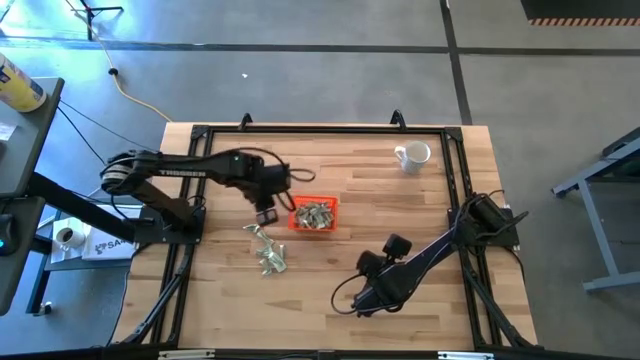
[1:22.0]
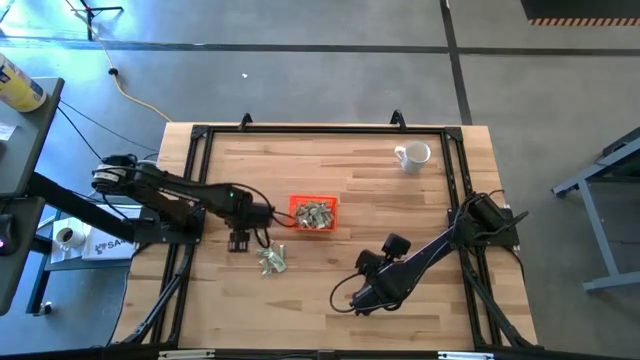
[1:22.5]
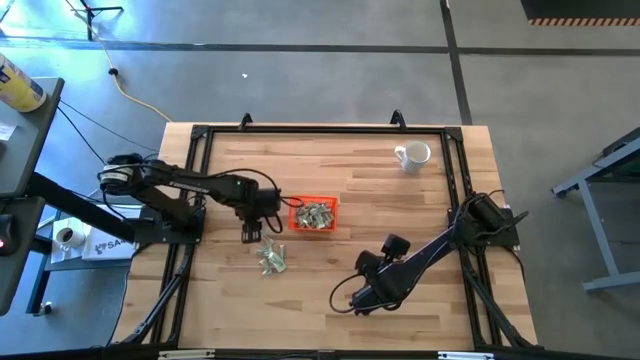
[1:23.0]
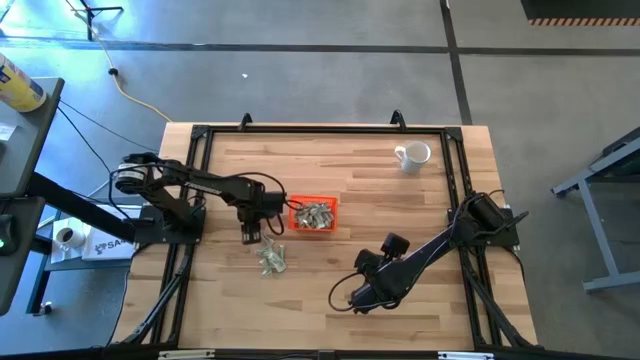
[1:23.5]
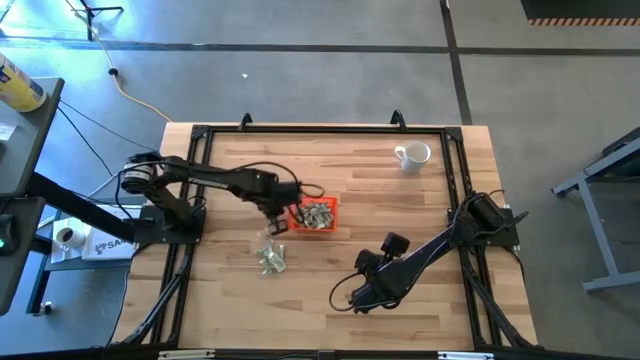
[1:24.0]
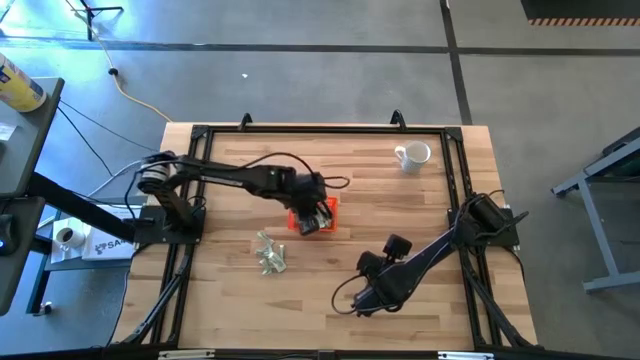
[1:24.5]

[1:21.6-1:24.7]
Task: Pick and place Stevia / Truvia into bins
Put the stevia packet into the orange bin

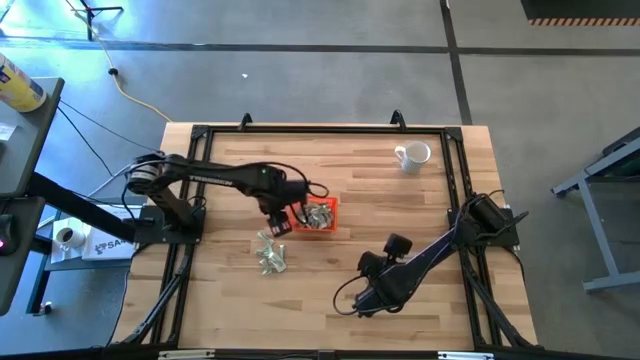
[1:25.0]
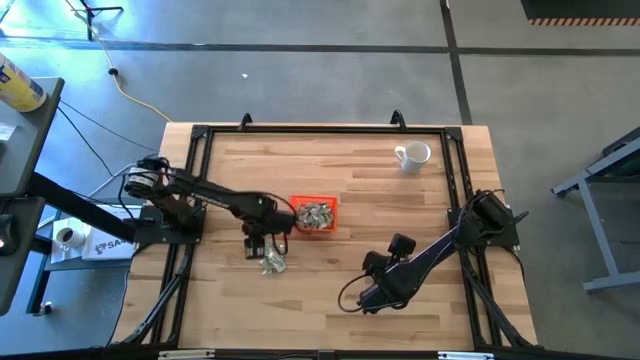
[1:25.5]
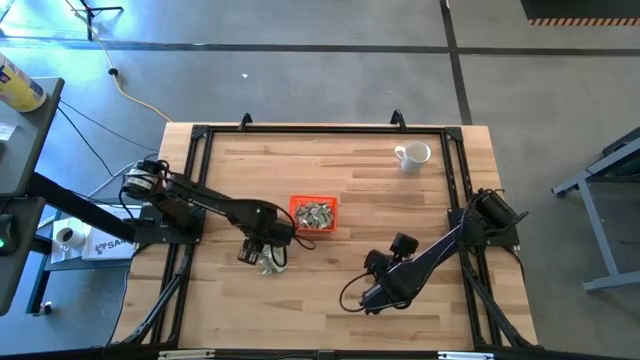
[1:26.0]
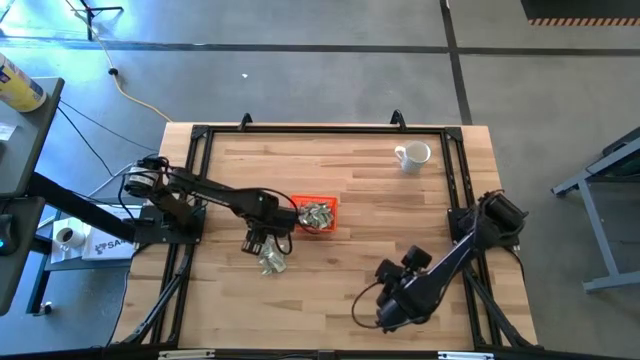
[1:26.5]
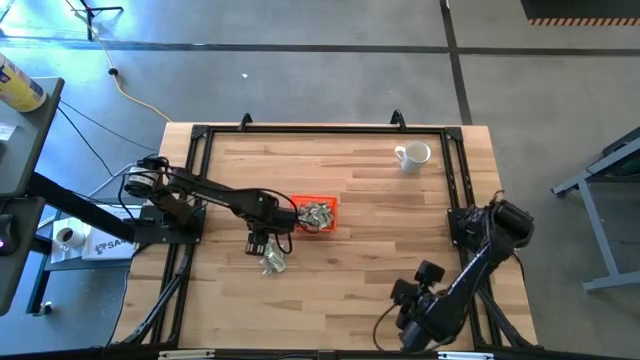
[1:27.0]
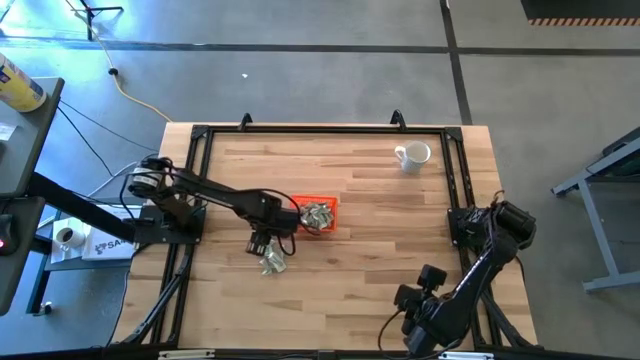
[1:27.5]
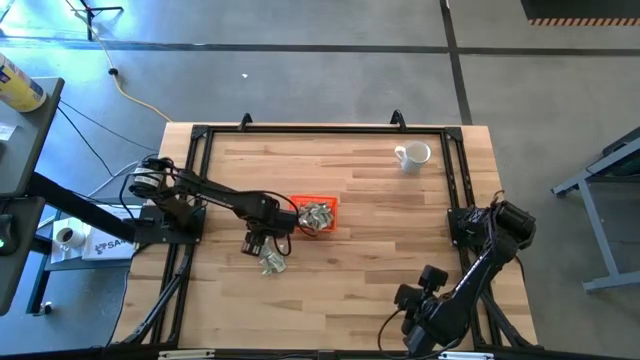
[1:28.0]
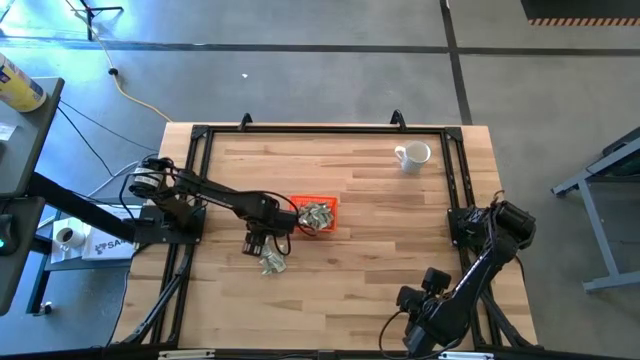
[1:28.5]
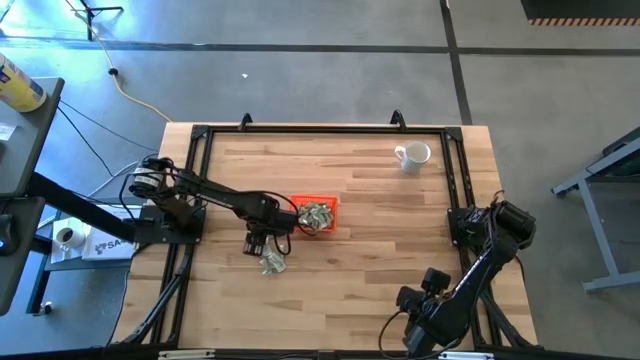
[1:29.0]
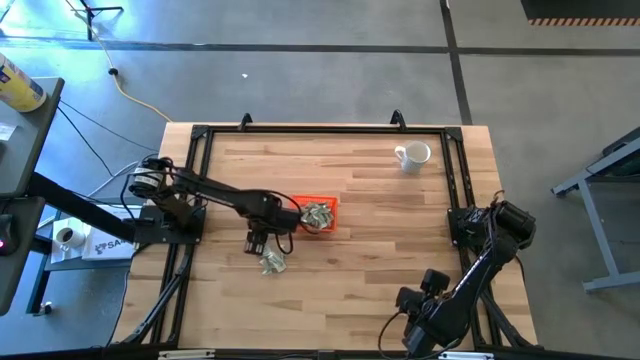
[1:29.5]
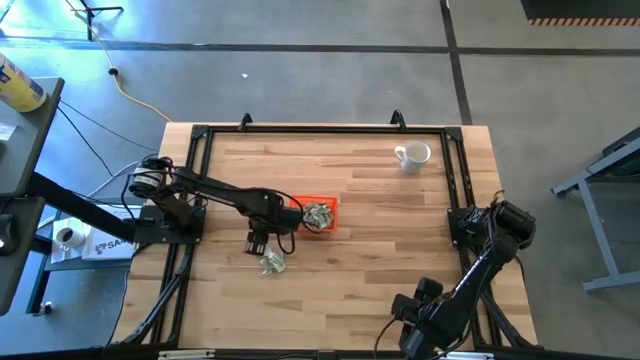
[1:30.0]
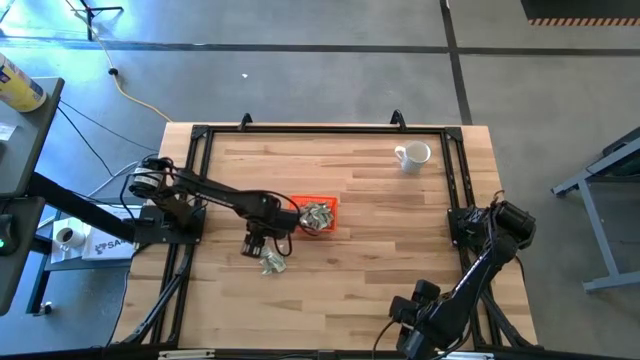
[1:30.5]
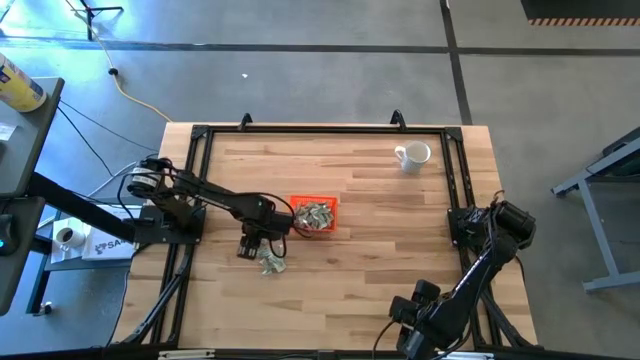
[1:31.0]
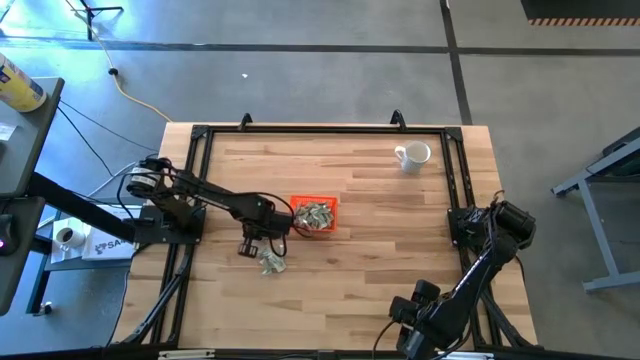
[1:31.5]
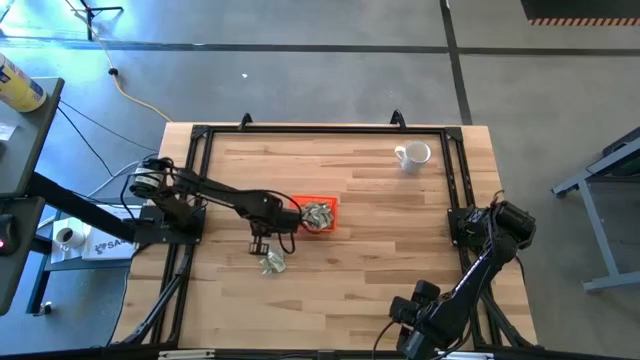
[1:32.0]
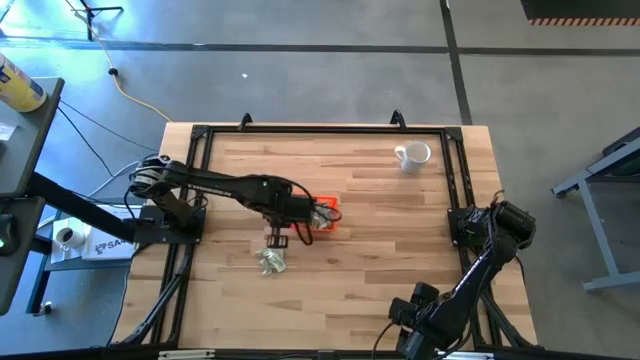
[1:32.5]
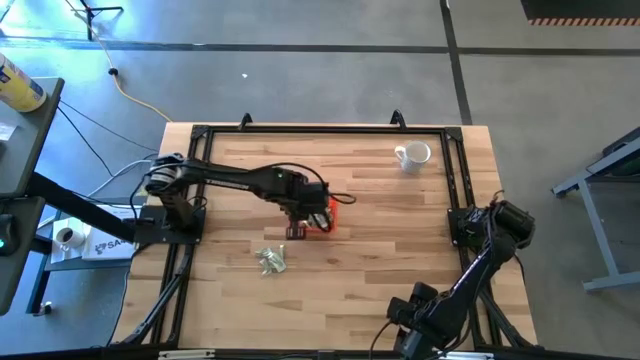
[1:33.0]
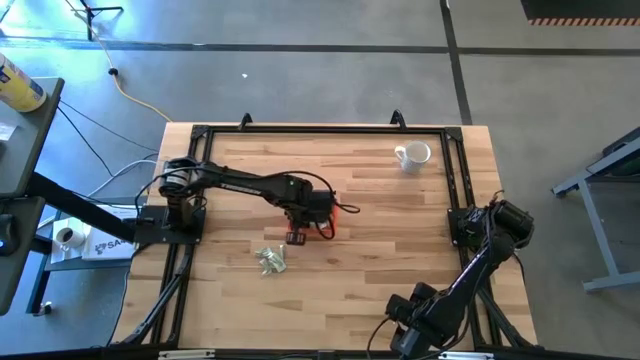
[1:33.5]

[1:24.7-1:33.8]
Put the stevia packet into the orange bin

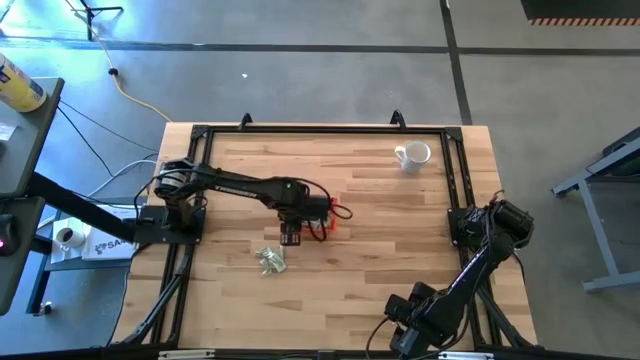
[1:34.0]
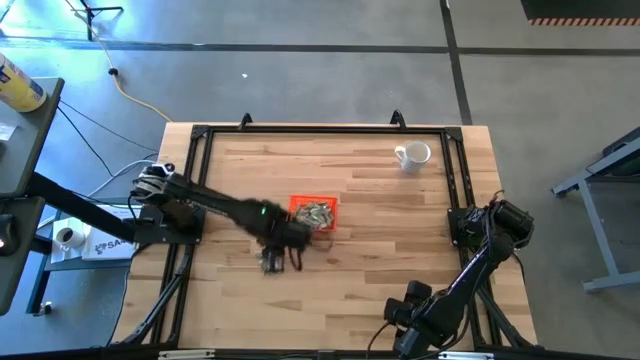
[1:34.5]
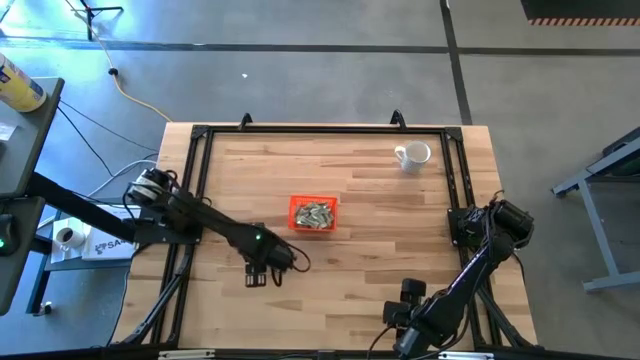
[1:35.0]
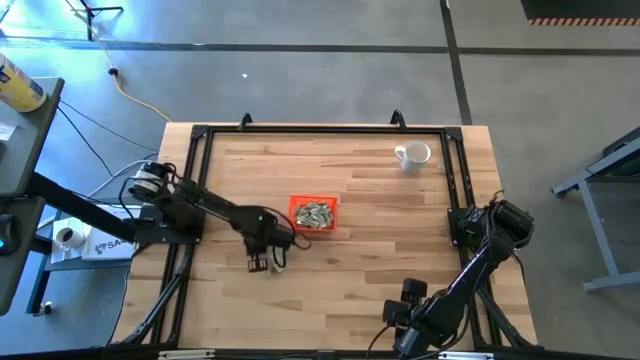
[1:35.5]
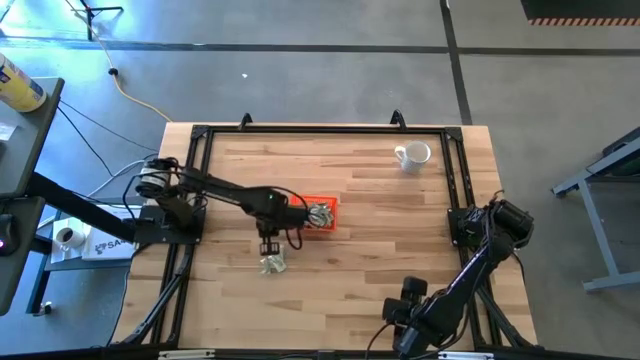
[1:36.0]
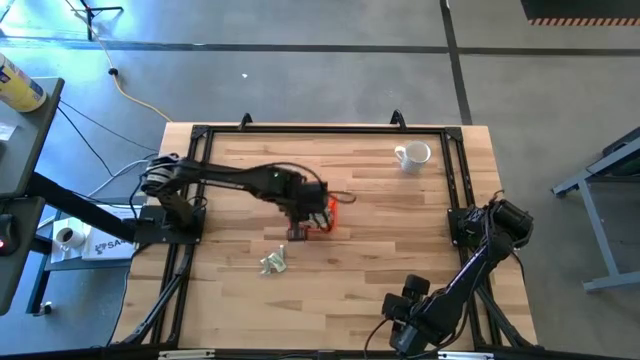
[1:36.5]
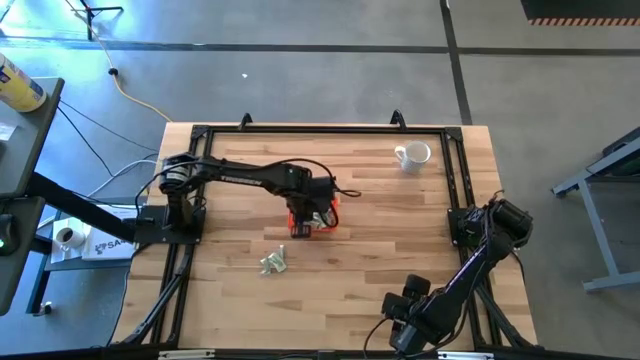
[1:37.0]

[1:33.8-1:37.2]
Put the stevia packet into the orange bin

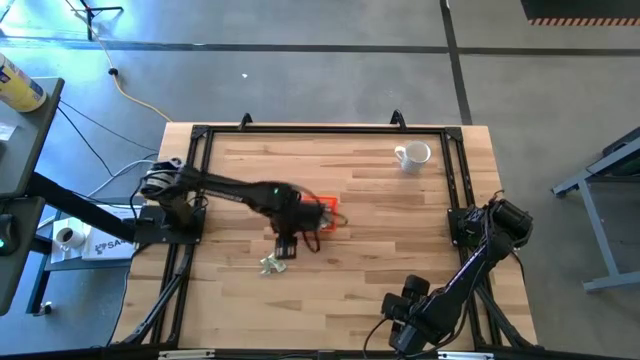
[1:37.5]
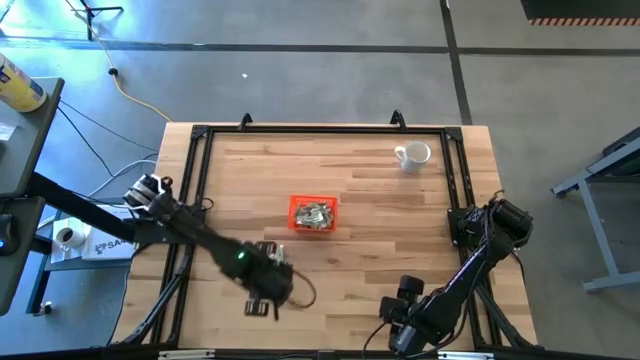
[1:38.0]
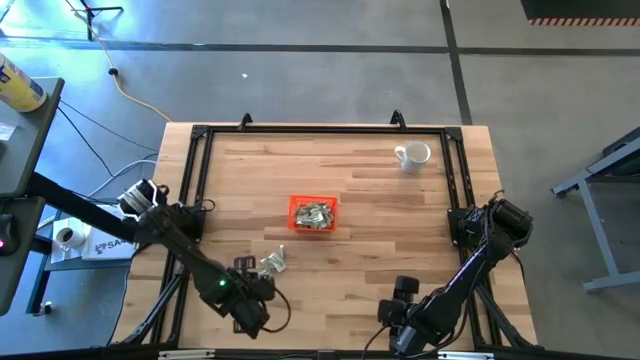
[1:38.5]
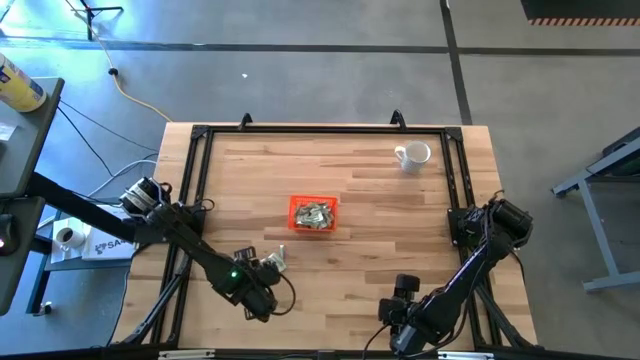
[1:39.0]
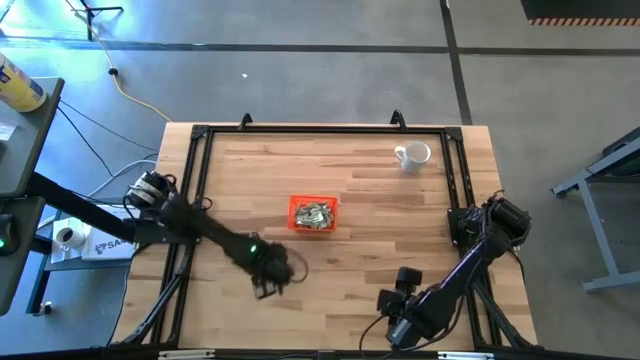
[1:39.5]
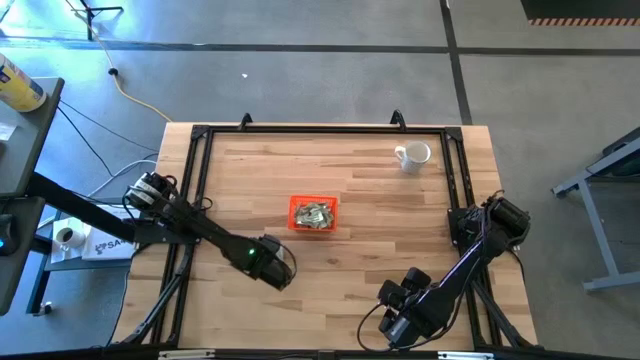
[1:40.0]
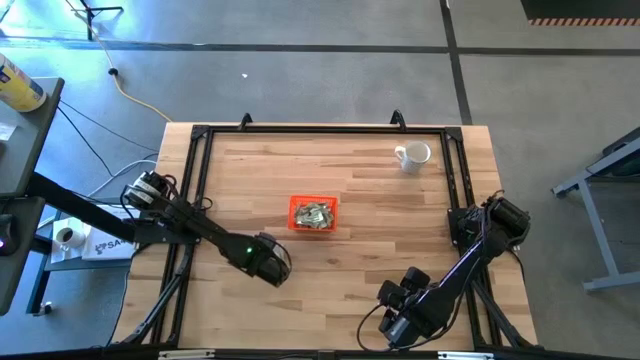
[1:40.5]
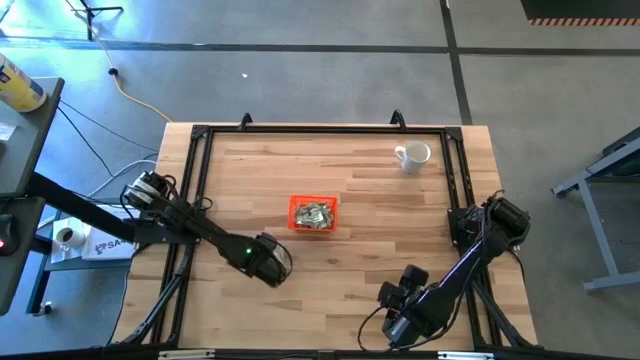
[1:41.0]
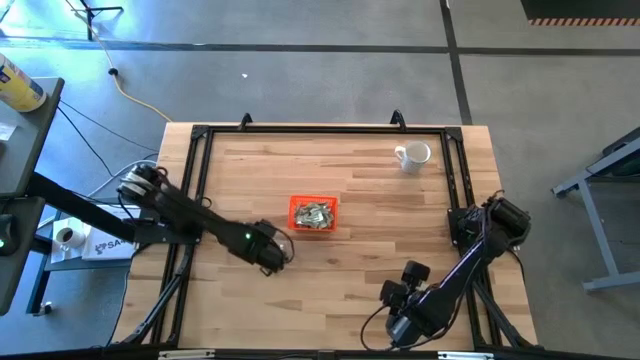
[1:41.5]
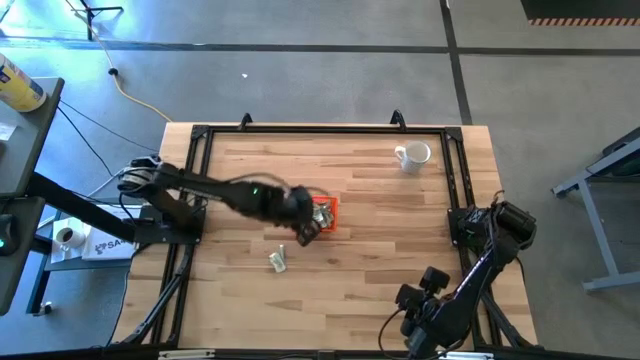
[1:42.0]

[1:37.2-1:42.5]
Put the stevia packet into the orange bin

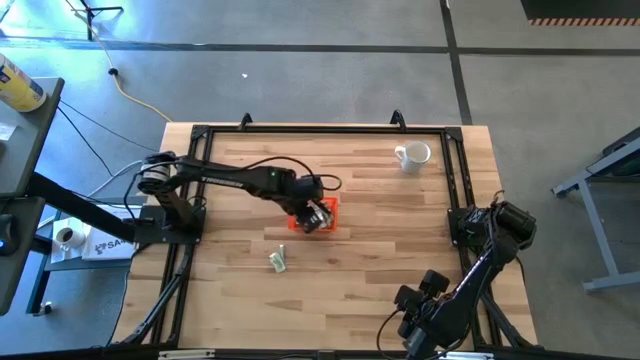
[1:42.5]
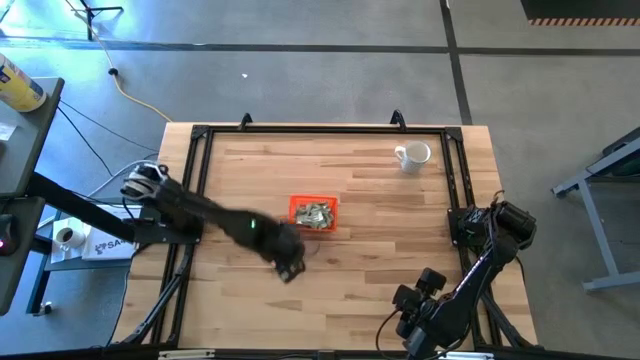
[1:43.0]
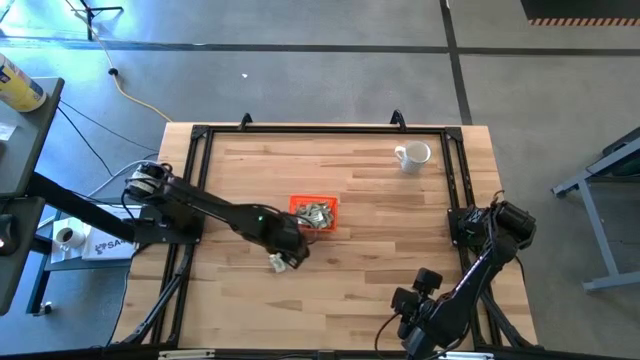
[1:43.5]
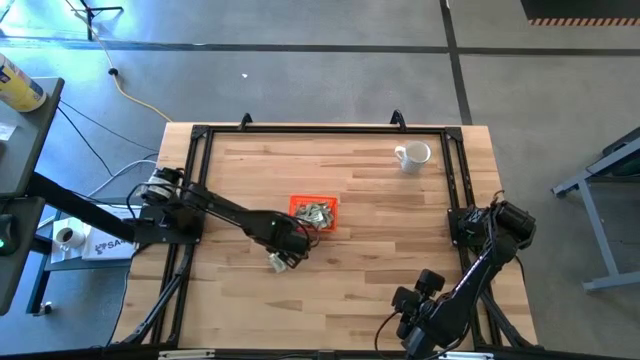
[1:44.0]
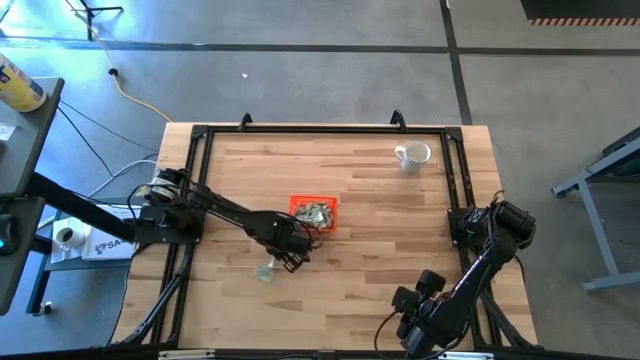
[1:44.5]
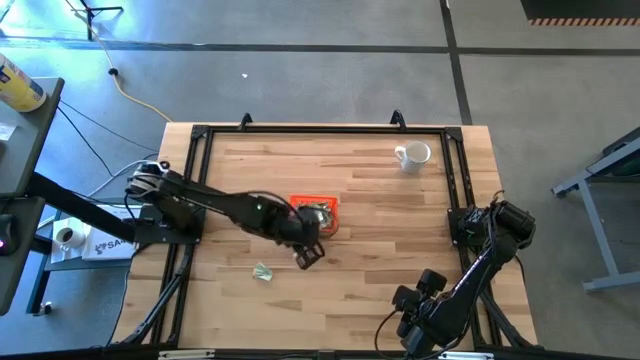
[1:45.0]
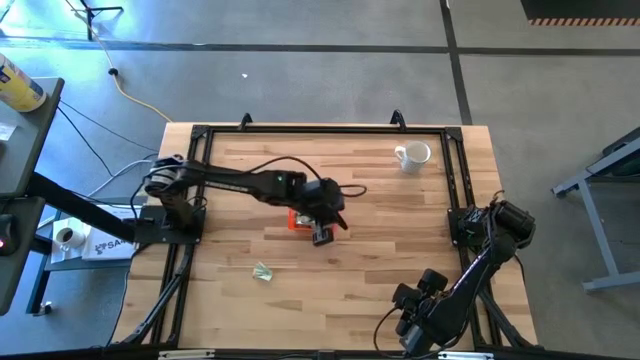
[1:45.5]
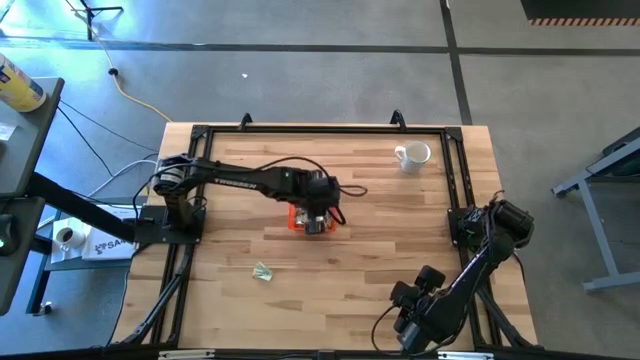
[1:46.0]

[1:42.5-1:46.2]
Put the stevia packet into the orange bin
